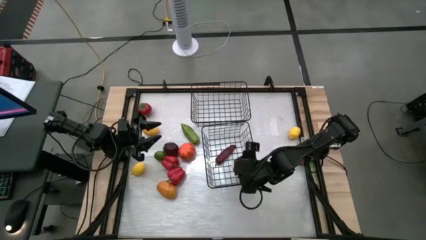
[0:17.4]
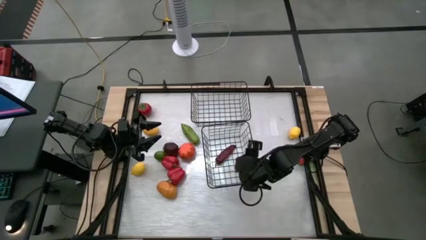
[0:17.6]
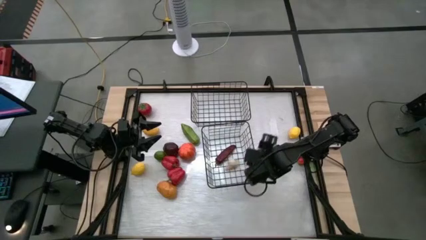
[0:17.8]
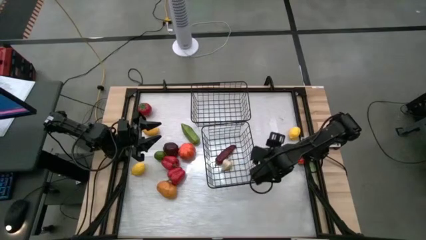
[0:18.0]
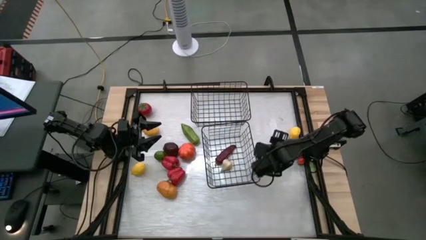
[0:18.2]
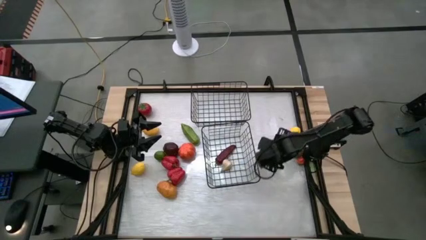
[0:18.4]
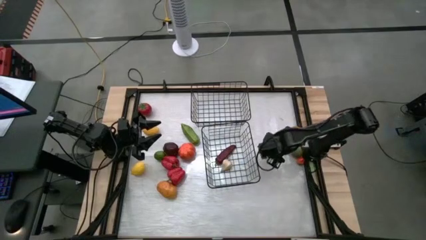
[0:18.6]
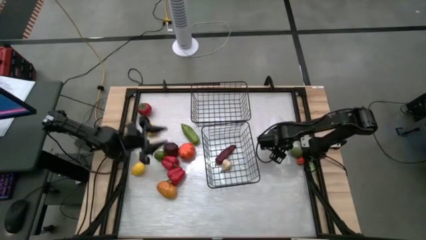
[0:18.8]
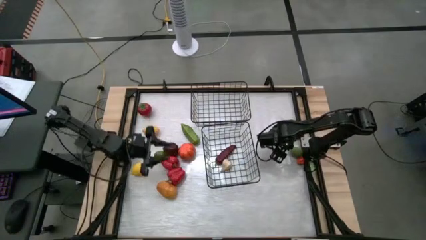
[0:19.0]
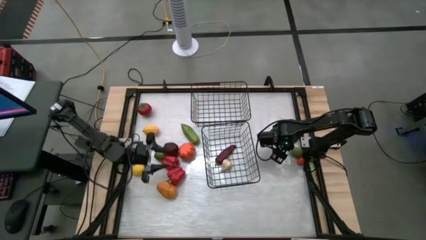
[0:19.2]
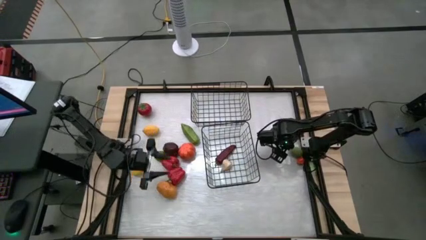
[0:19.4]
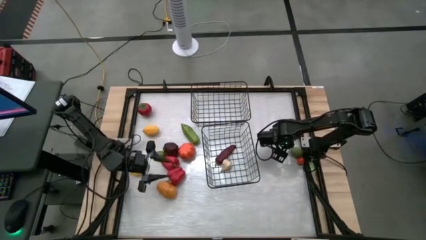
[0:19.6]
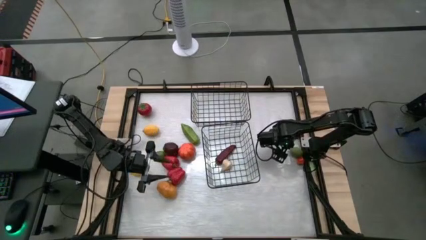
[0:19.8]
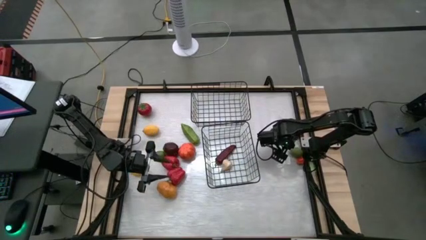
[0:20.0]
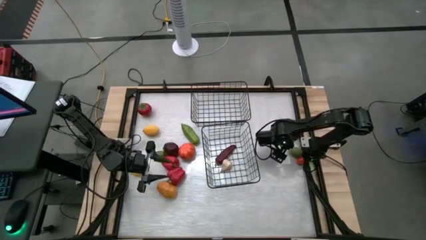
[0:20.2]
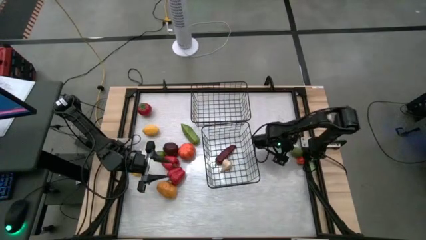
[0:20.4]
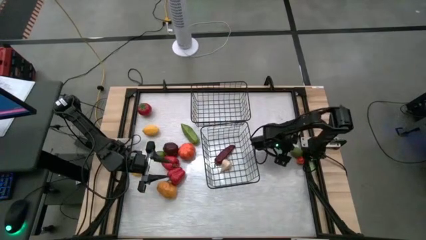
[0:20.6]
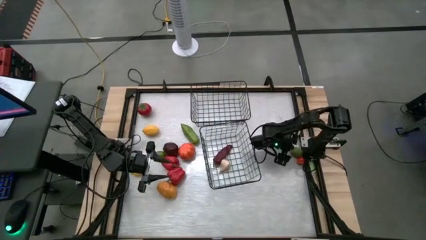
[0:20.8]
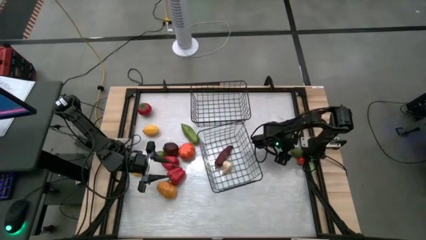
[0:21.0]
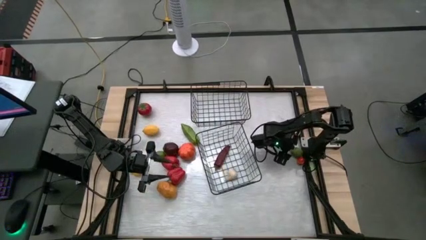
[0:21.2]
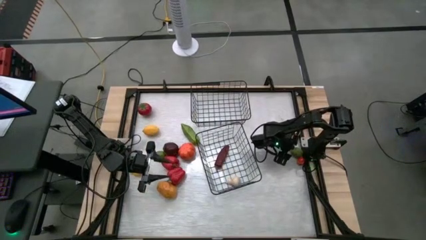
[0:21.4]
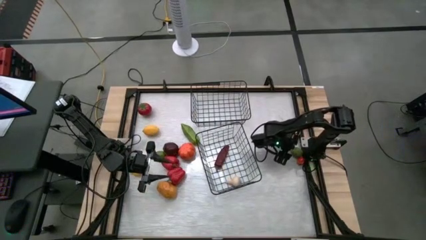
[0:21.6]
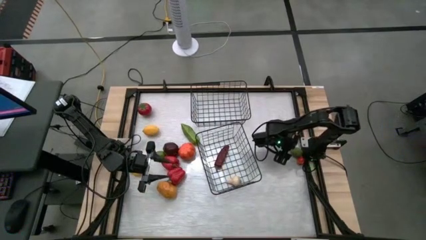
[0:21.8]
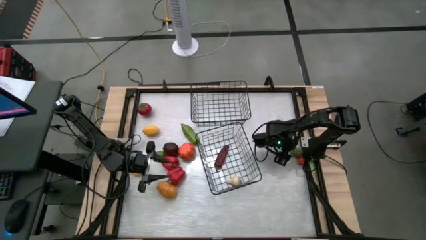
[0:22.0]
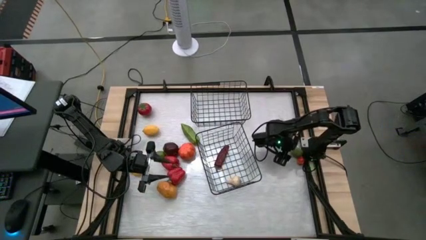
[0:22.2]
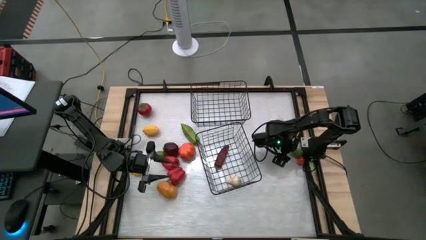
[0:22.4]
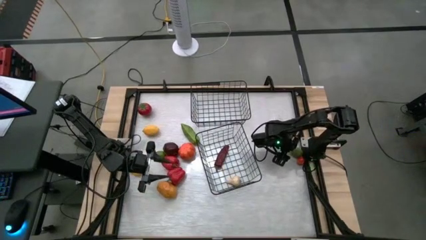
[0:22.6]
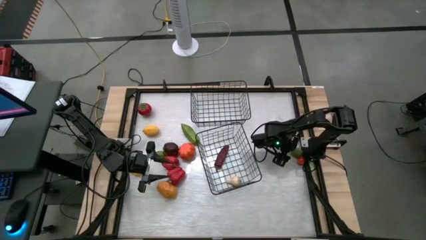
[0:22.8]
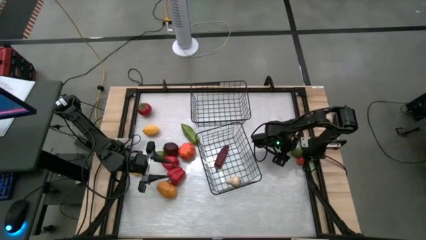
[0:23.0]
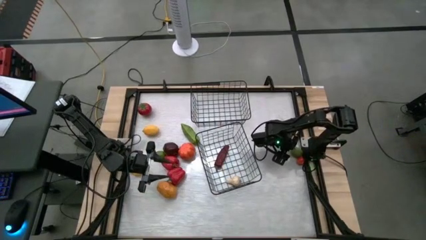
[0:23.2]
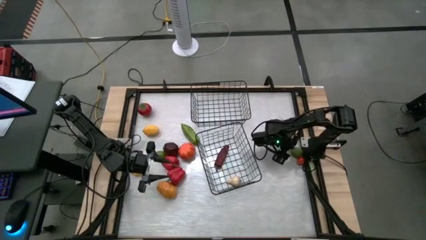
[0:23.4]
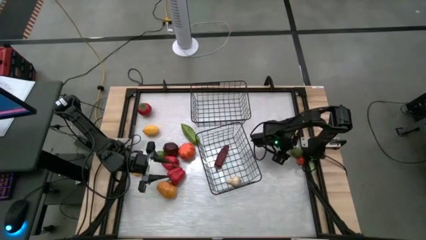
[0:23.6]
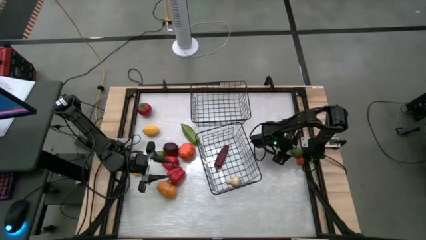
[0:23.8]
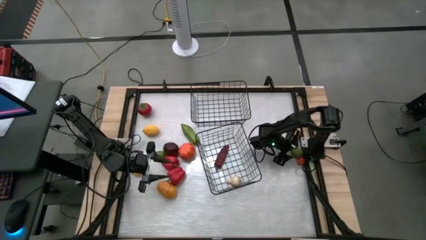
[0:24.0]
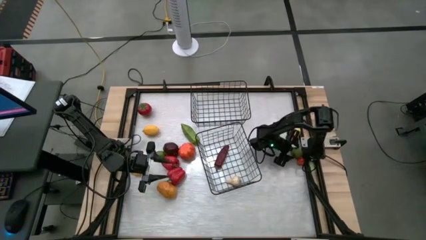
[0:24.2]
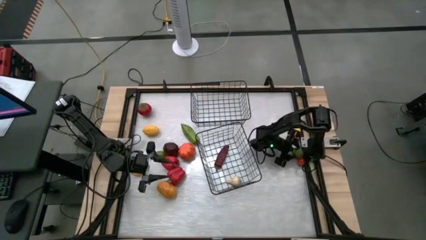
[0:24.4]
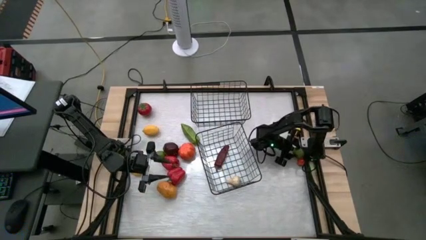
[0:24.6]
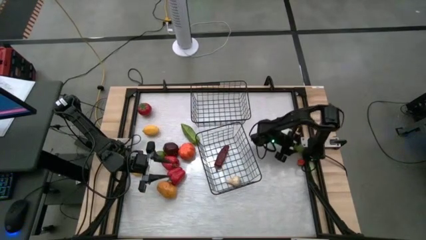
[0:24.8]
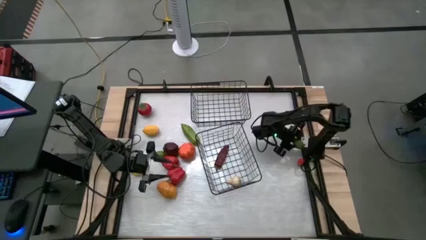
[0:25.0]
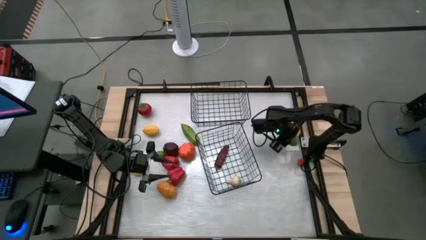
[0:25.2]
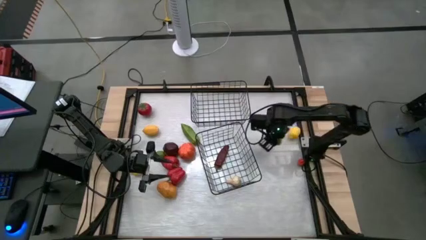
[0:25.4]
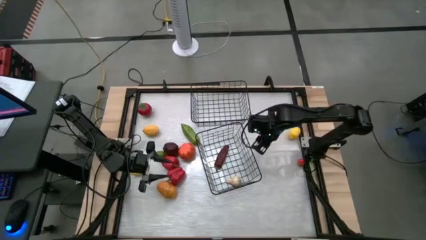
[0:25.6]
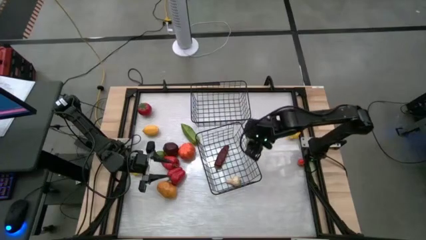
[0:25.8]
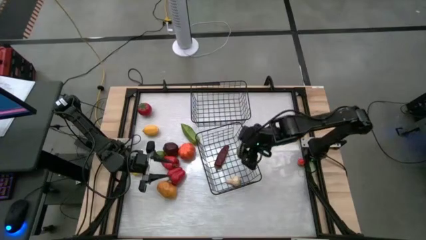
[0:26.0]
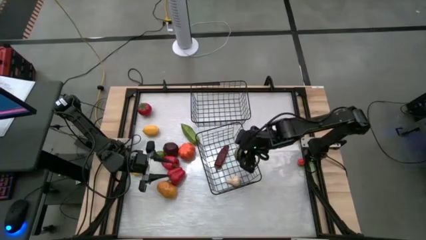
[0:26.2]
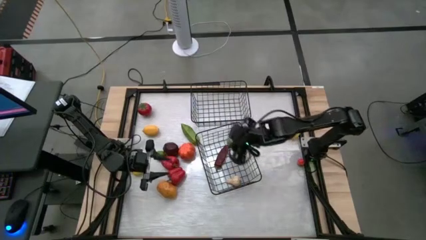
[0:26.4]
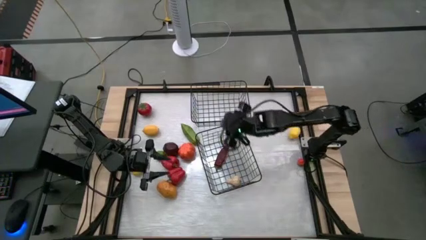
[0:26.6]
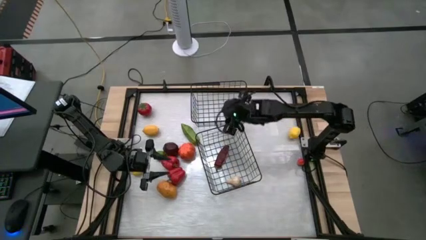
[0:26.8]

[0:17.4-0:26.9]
Task: Sort produce into baskets
Put the right green lime into the top wire basket

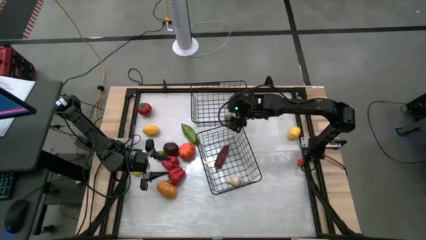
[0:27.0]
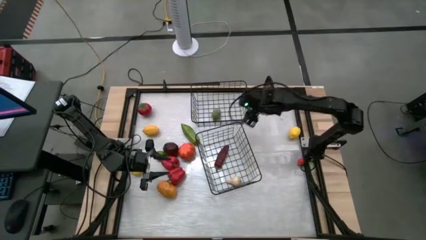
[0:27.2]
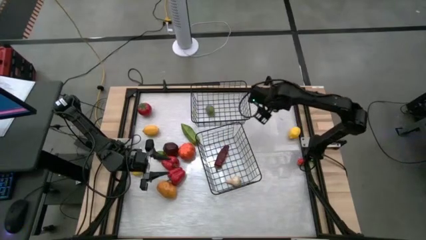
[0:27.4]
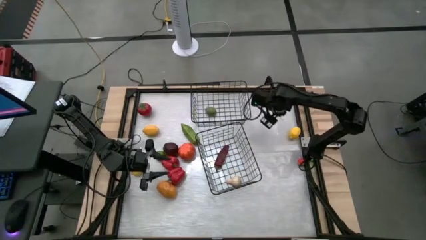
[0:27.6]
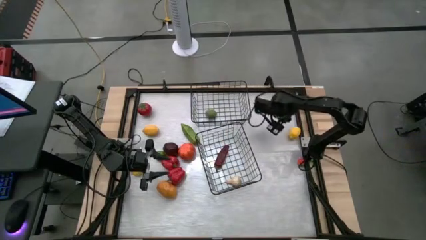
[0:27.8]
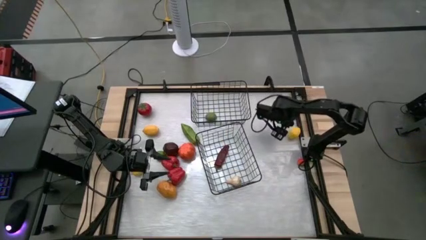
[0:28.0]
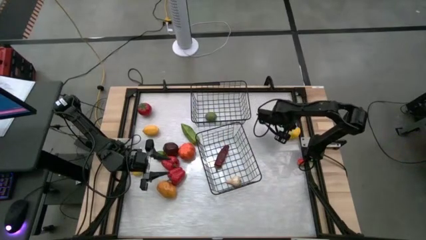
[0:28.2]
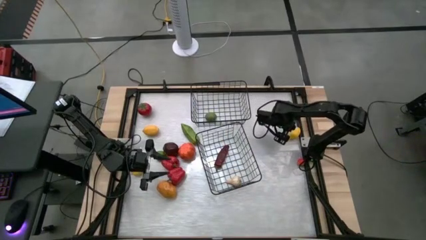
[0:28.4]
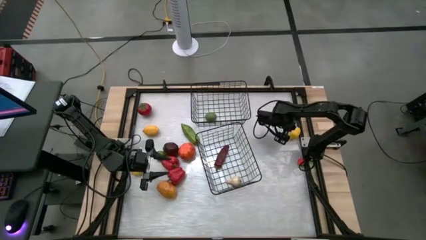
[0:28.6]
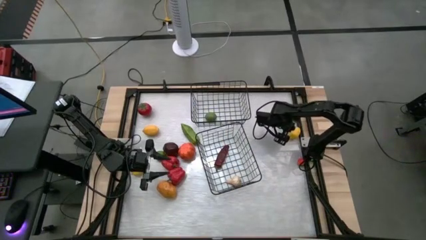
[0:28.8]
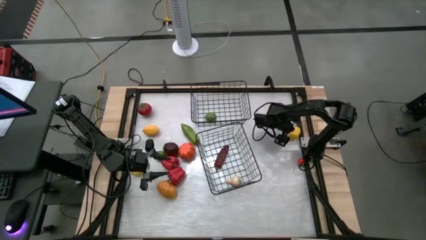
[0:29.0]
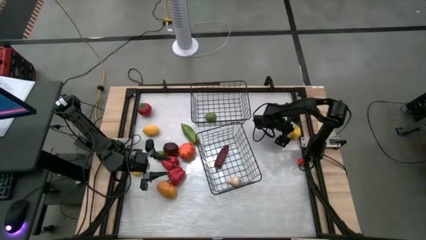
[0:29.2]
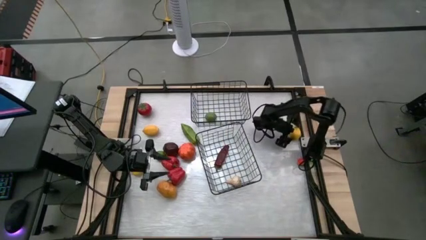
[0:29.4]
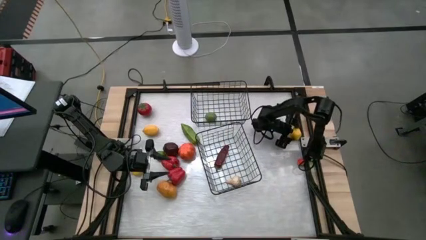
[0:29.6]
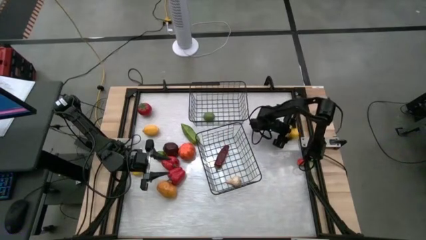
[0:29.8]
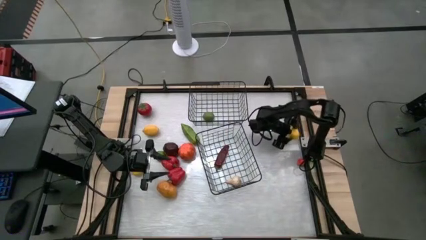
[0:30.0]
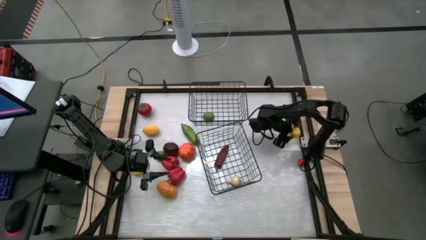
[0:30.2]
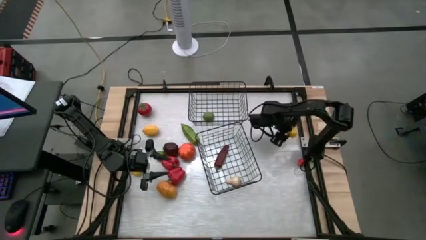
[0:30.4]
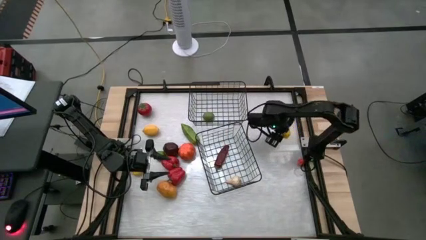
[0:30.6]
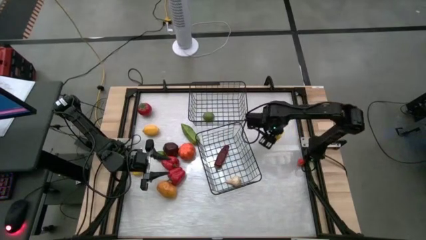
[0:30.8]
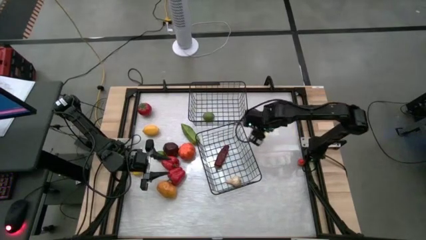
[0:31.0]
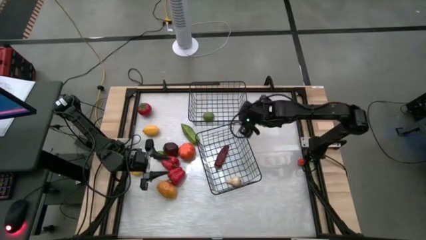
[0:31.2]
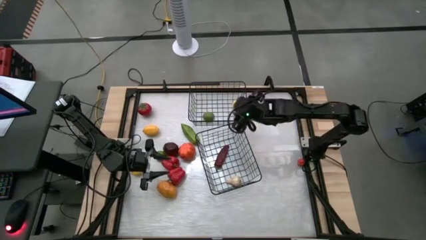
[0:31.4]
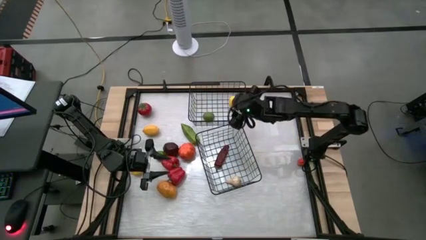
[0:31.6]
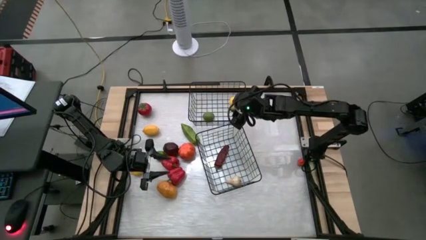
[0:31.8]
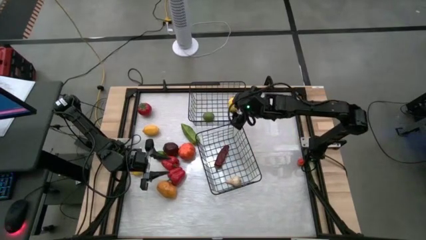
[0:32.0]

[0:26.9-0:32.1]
Put the right yellow lemon into the top wire basket

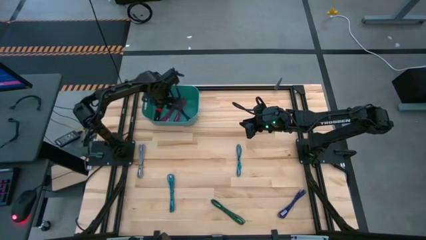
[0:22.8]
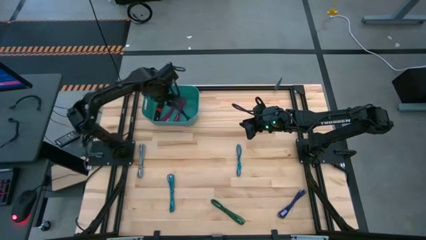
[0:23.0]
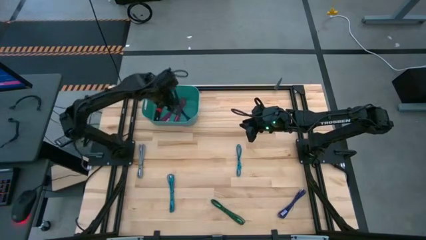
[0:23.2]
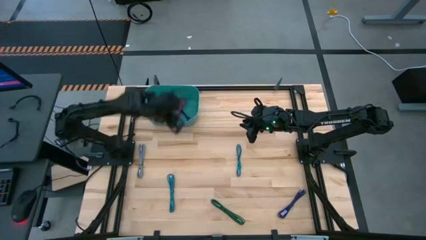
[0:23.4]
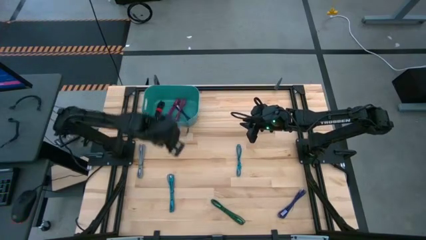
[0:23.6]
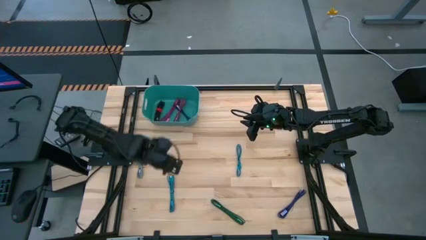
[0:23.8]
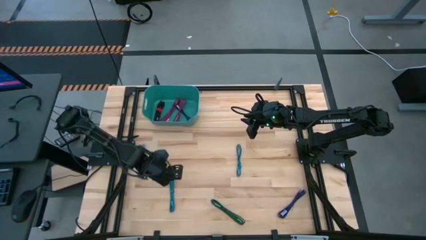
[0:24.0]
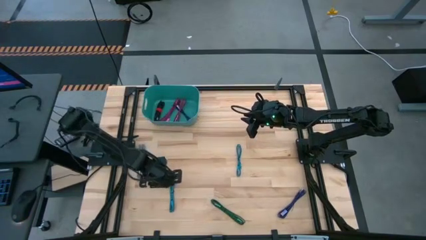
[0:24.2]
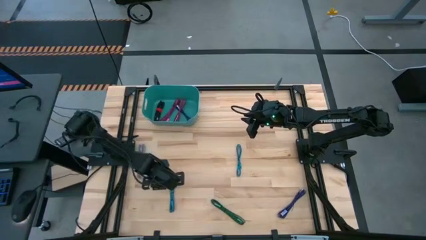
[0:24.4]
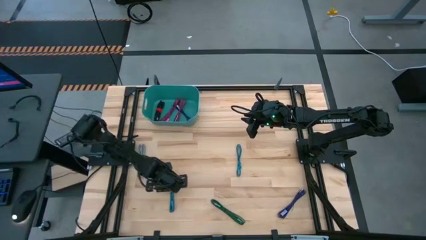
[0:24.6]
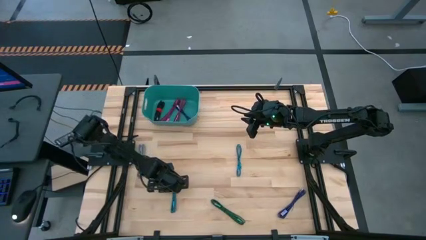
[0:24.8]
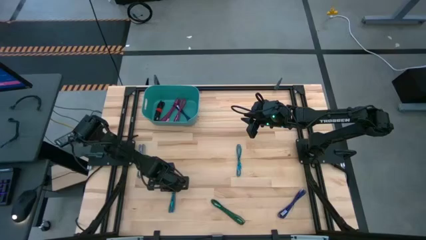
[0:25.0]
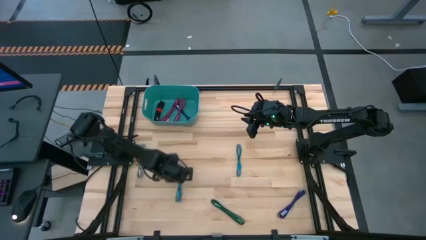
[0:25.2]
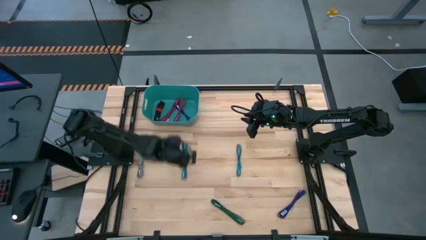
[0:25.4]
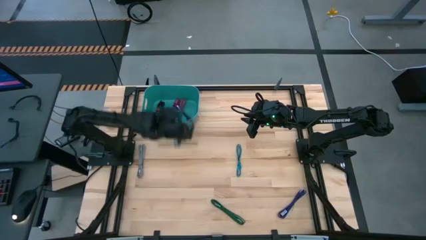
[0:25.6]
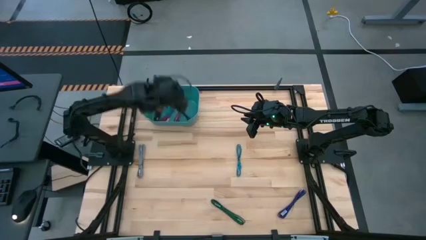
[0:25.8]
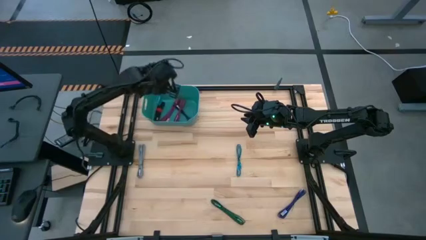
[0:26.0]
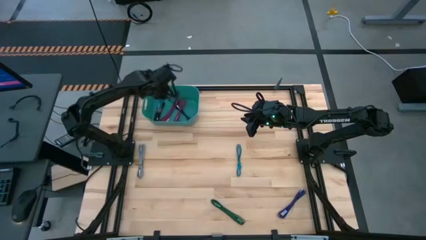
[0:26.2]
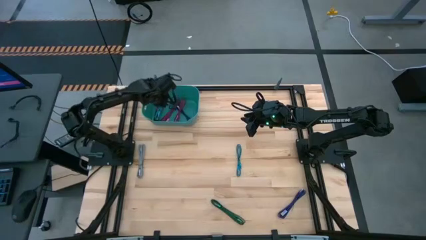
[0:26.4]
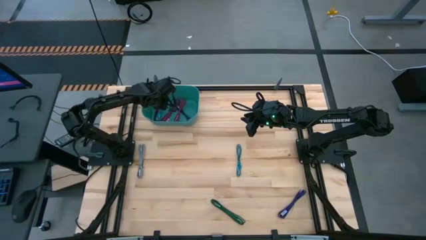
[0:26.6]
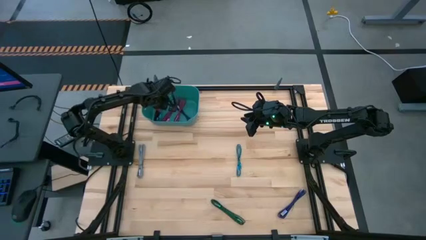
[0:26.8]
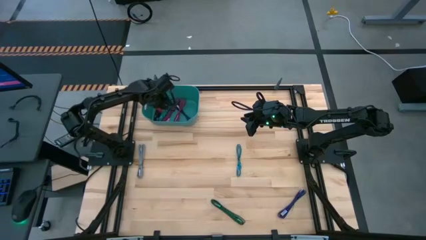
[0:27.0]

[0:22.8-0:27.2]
Task: Pick and place USB-C Cables
Put the left blue USB charger cable into the green bin
